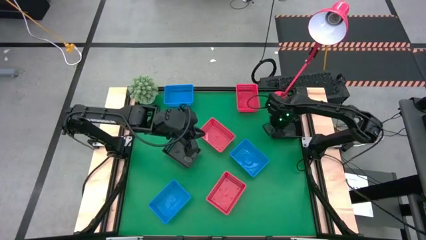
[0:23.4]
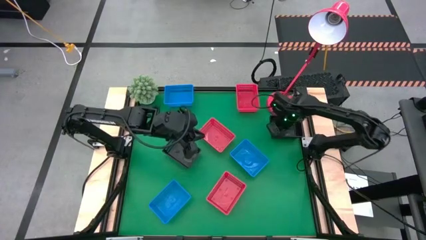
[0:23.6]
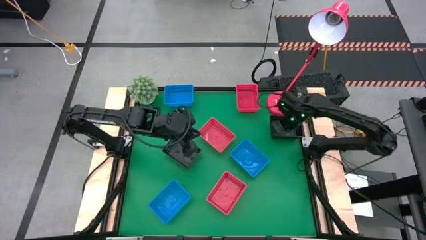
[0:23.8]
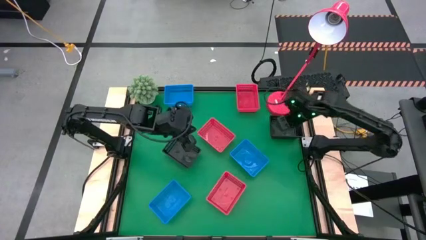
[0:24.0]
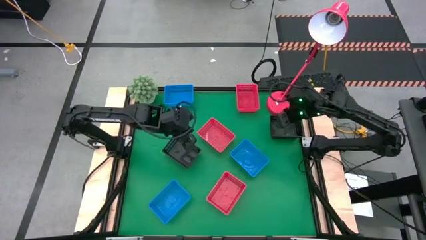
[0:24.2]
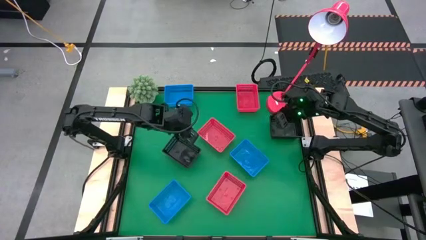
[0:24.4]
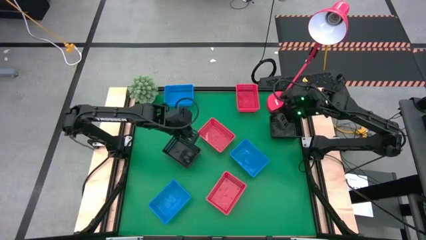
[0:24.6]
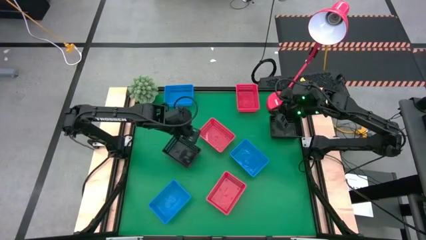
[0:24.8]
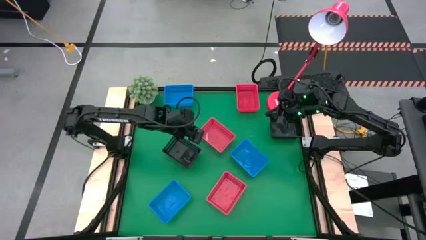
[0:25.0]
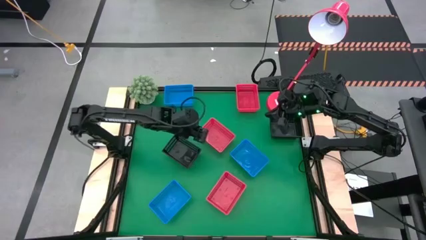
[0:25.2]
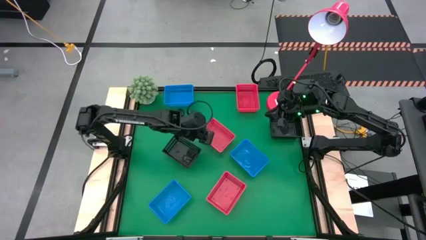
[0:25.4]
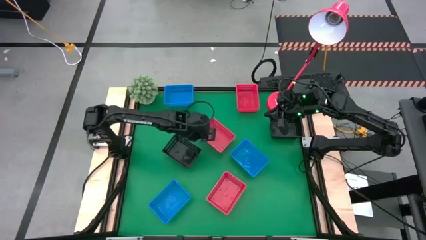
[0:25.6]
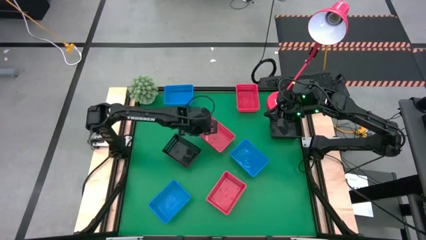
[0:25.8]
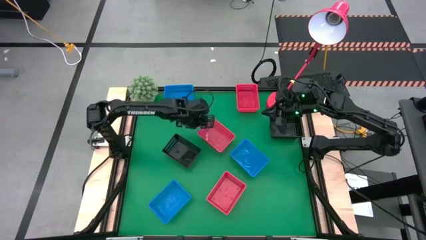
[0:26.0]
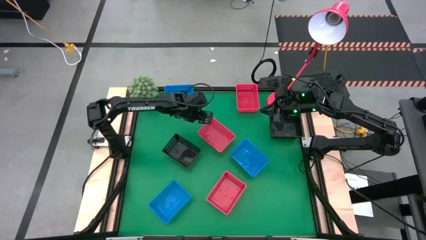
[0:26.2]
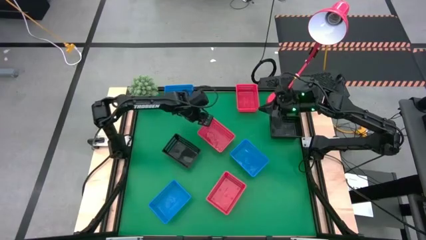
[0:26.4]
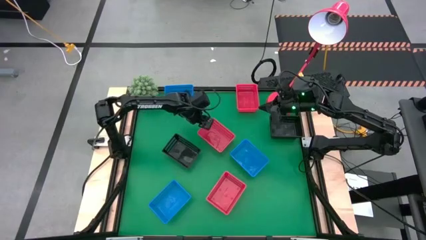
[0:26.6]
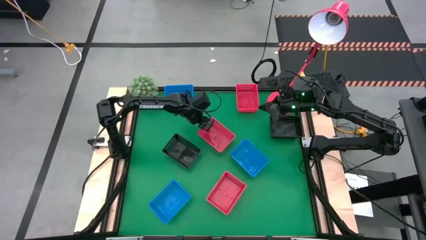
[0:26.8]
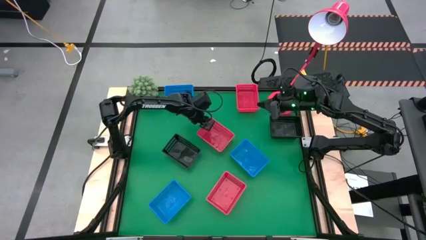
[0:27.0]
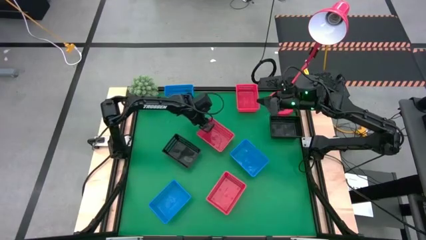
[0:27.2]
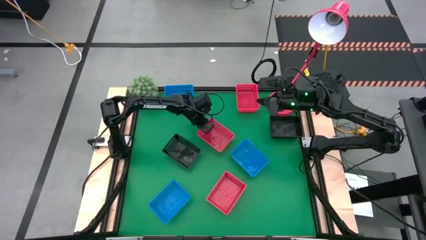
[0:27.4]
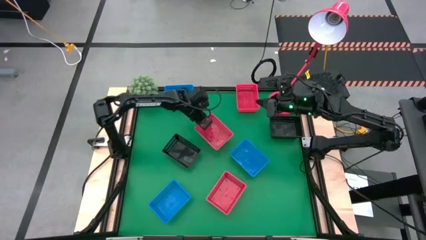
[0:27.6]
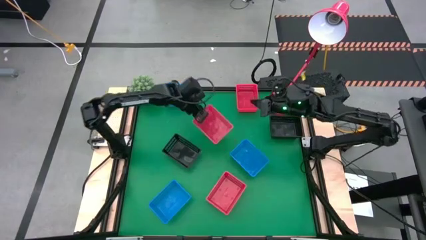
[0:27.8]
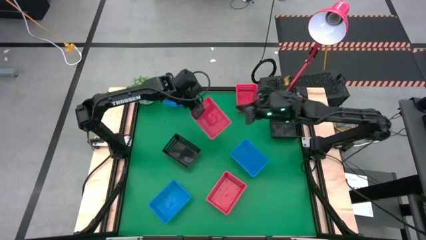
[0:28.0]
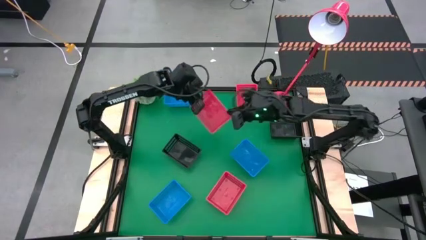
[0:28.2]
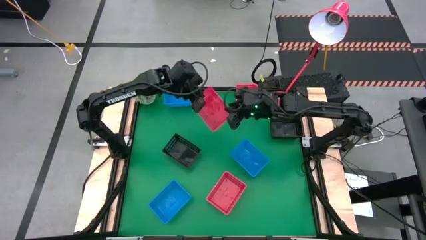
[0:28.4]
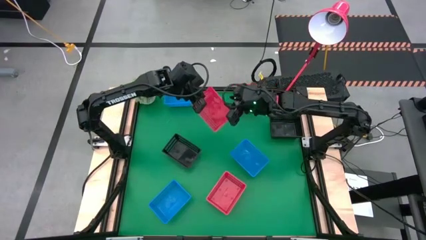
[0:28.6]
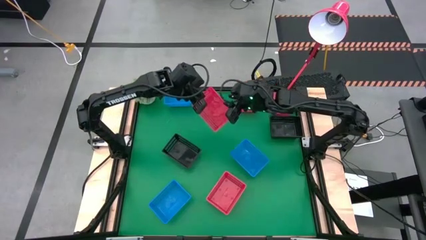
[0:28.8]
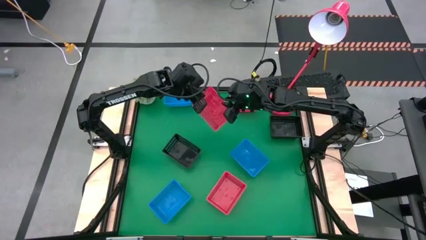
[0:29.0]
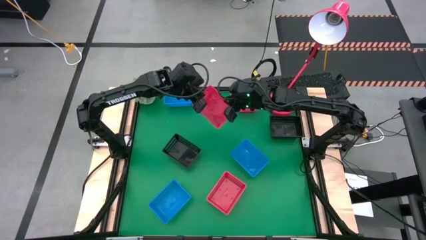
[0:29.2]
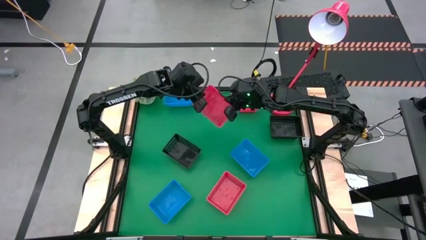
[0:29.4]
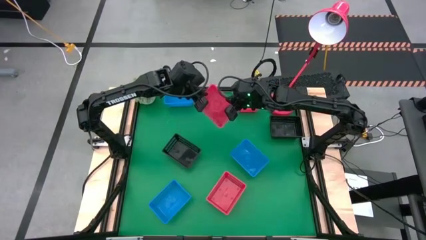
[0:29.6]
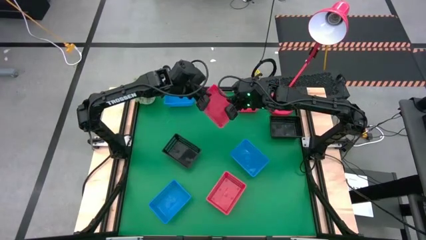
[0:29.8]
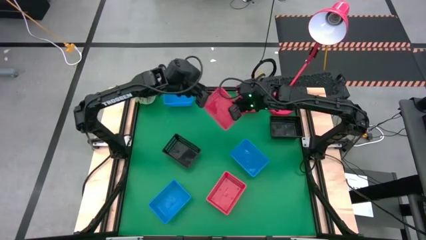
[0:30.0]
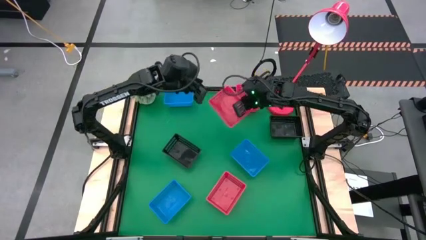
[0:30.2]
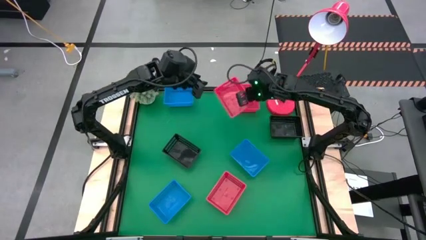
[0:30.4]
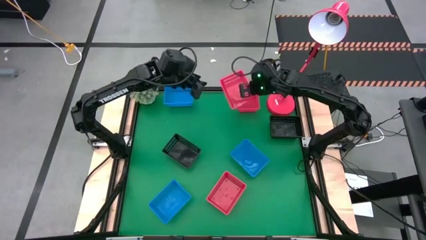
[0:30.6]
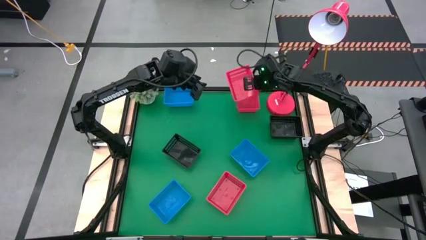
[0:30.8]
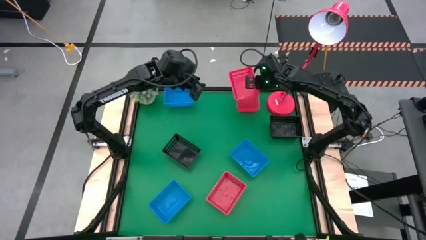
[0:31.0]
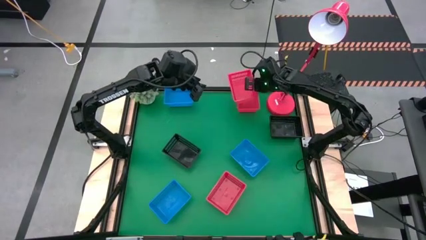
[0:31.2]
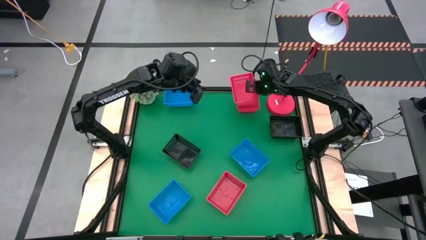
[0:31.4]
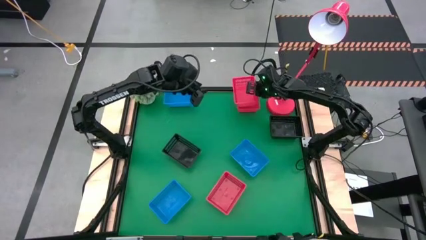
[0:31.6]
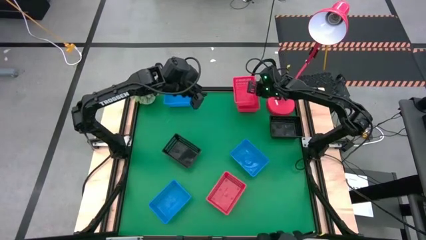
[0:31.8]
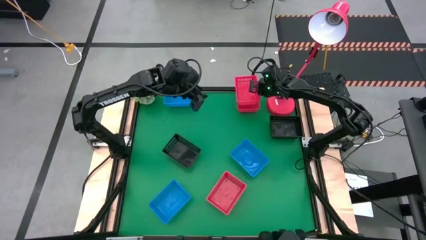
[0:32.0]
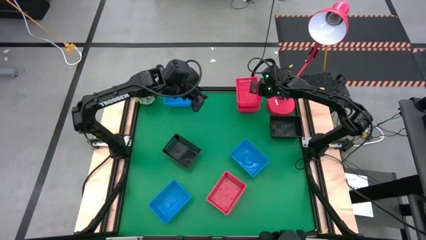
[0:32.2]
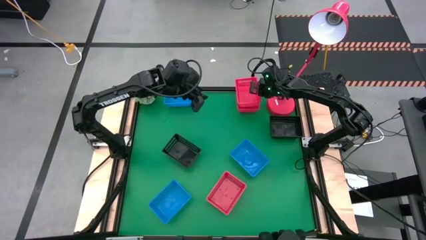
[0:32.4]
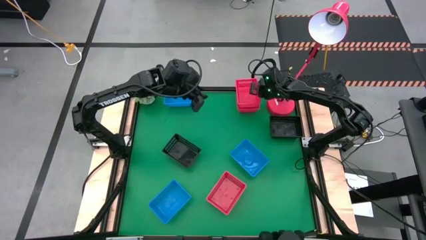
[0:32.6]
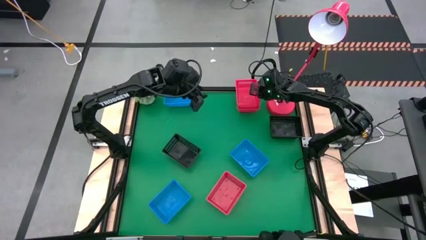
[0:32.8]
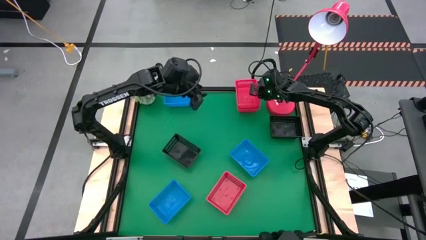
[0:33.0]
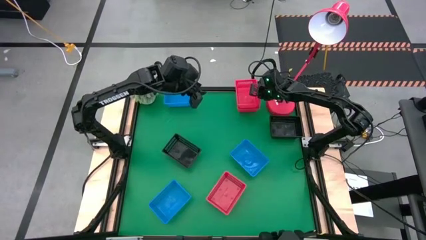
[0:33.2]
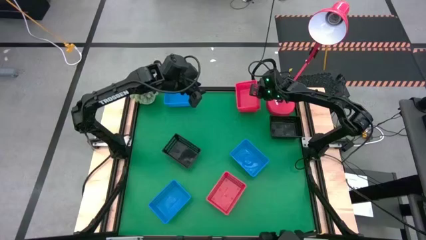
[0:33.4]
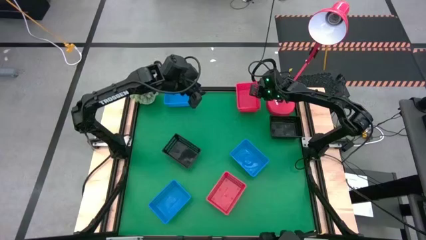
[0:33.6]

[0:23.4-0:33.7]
Stack the middle red bin on top of the top red bin
